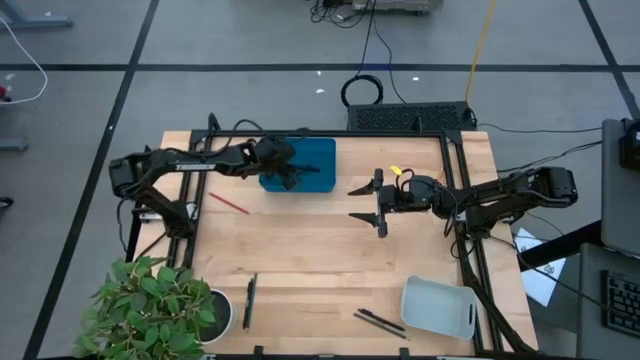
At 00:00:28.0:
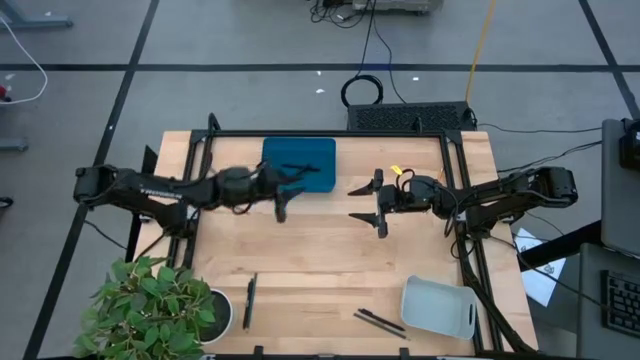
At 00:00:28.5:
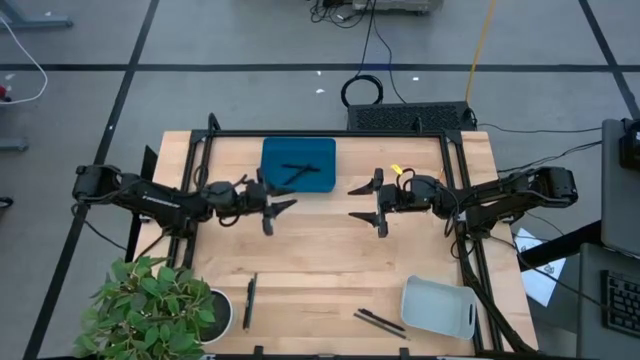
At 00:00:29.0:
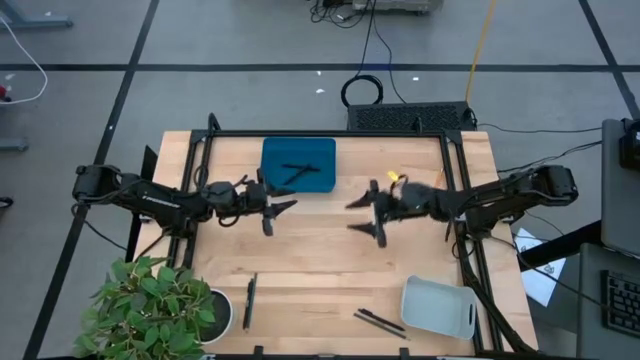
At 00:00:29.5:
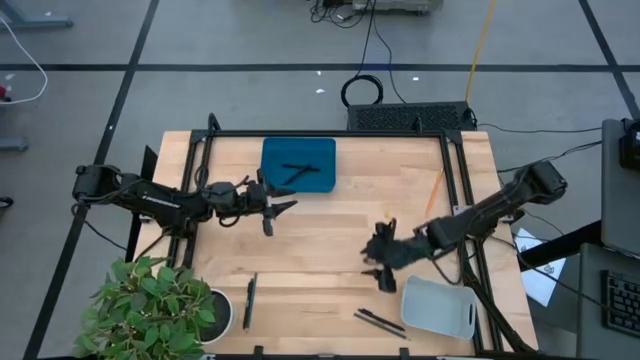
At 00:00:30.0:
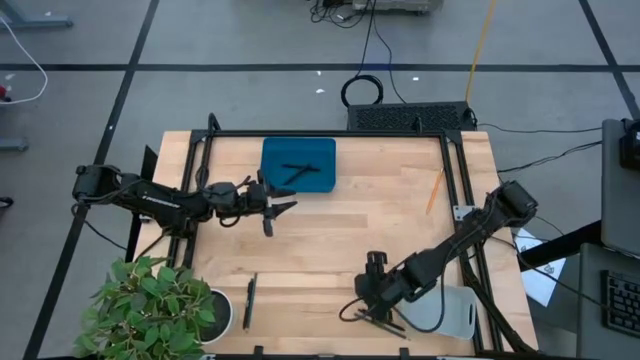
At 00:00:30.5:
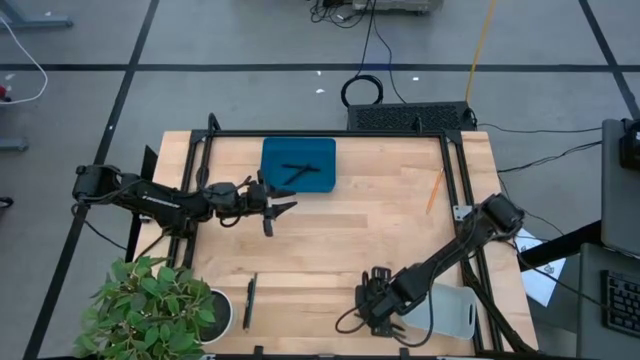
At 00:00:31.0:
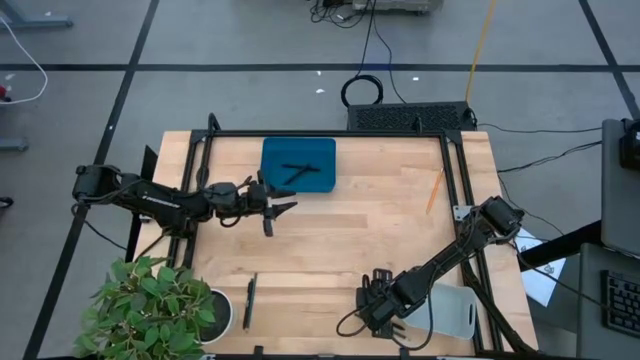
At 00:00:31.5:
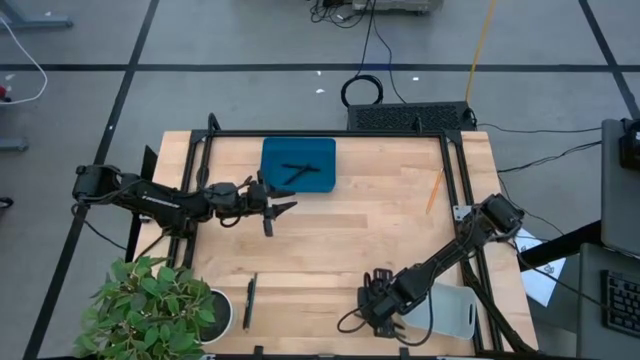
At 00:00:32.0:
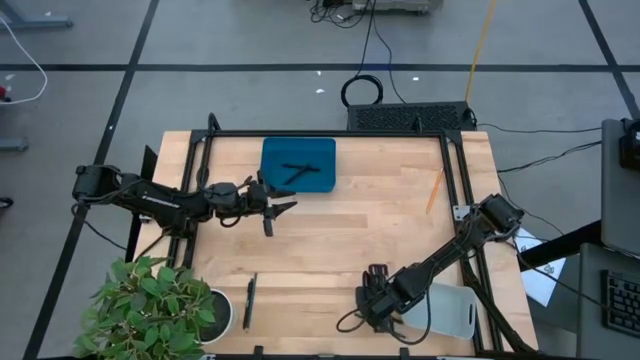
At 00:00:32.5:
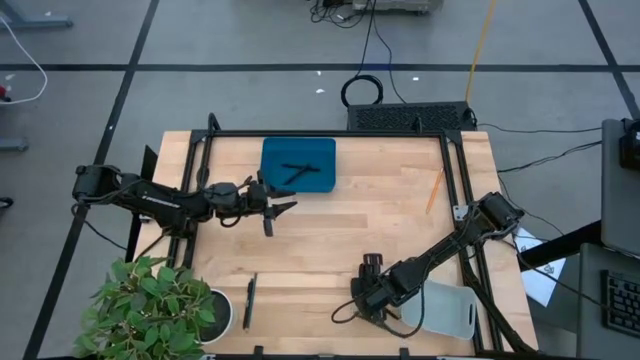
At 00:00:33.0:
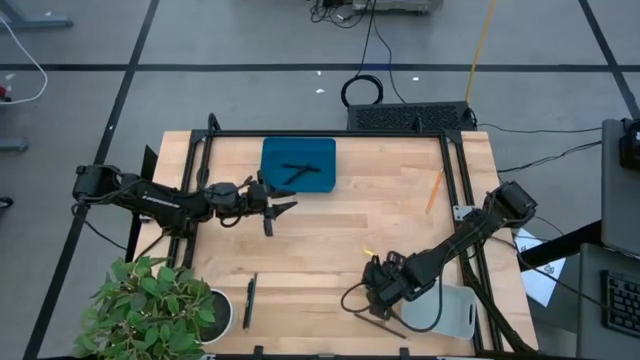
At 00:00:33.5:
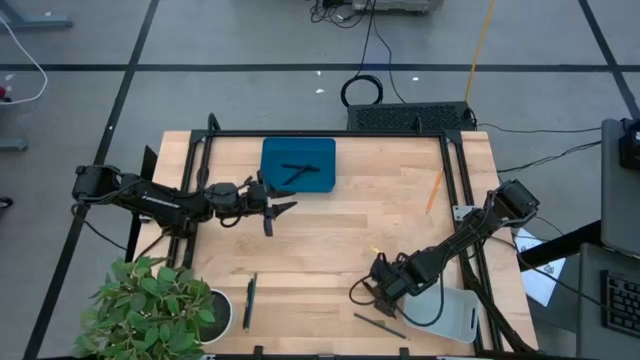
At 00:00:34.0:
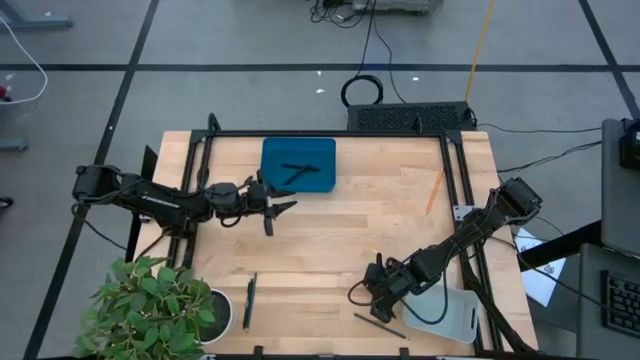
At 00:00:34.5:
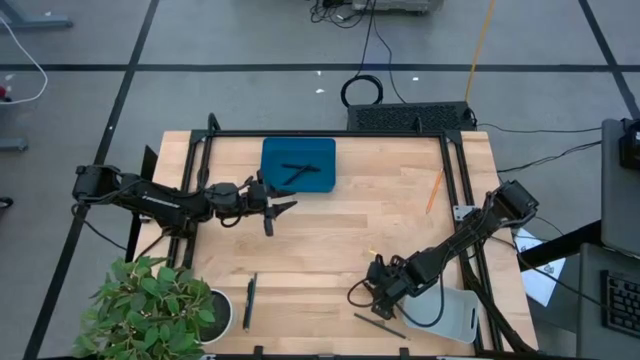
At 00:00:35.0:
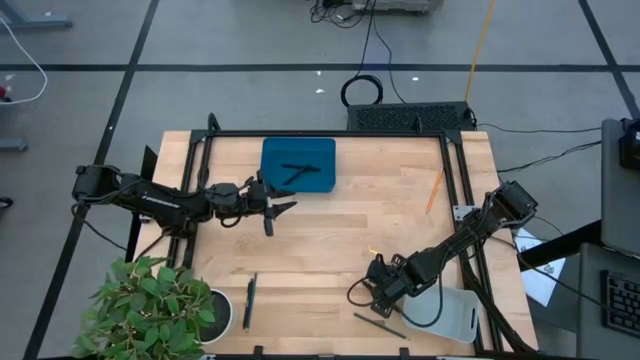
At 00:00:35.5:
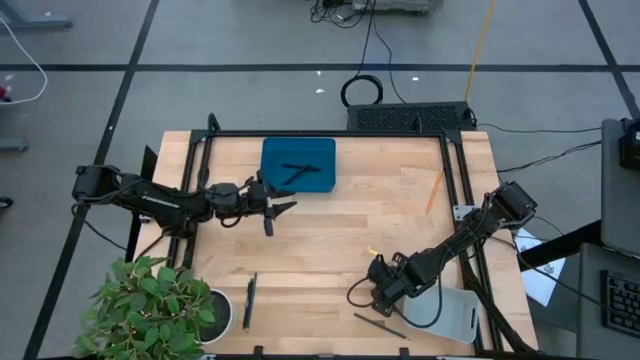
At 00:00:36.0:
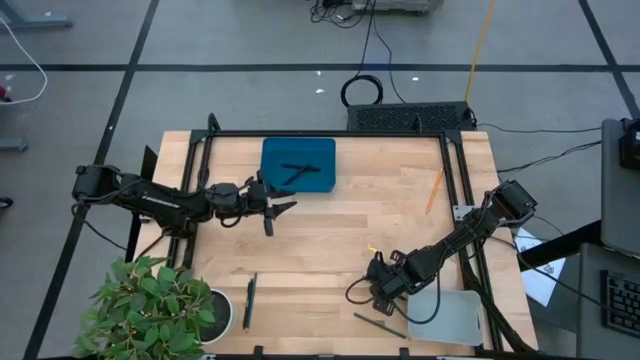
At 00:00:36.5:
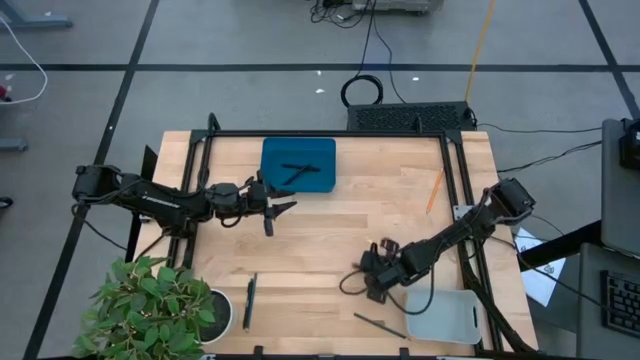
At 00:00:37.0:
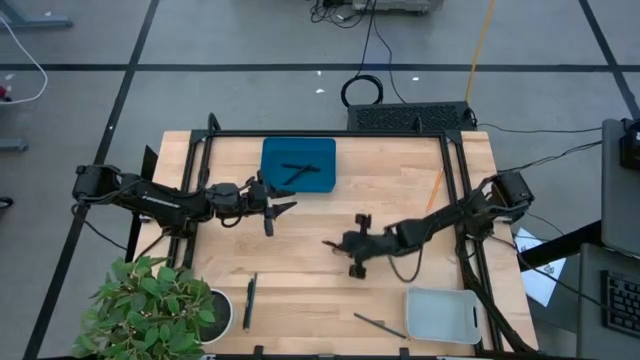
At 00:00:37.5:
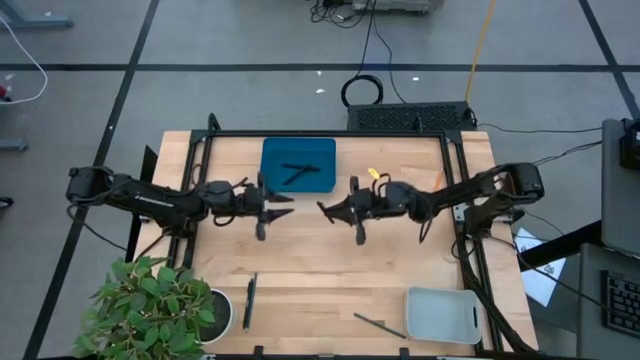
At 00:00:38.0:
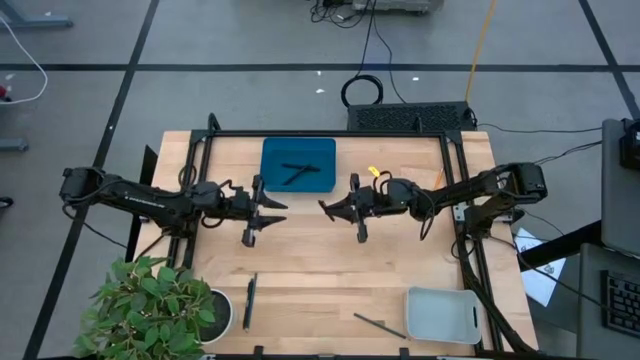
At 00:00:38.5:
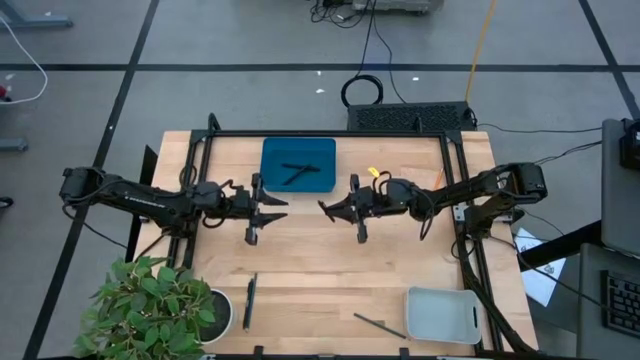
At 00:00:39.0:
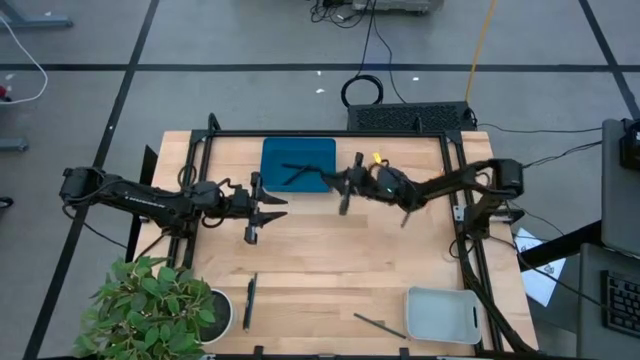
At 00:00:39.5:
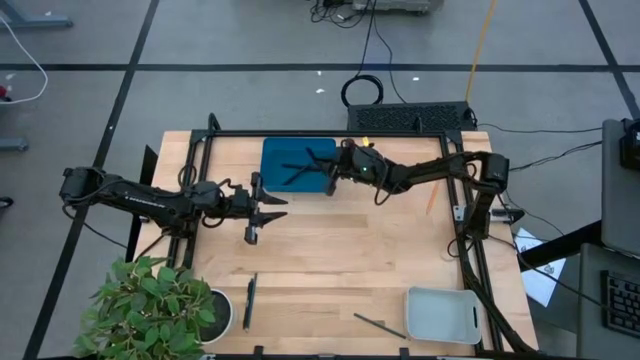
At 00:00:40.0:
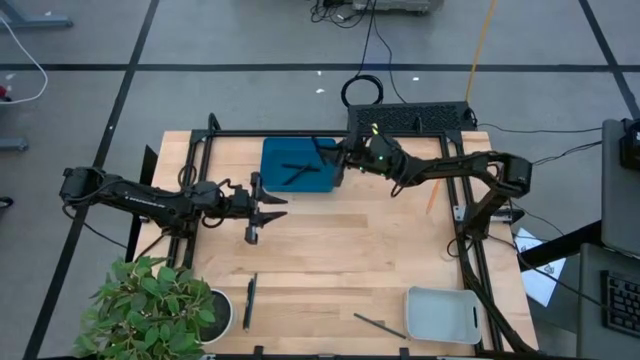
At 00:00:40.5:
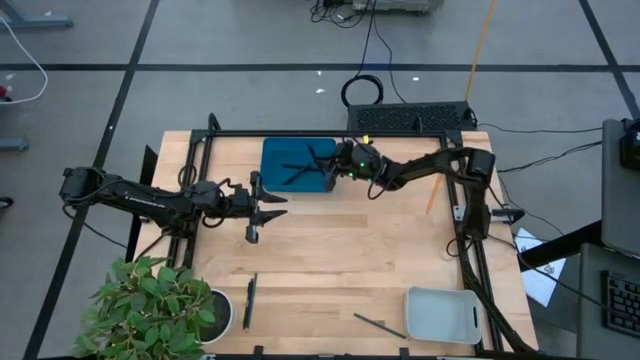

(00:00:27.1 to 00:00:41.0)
Task: Sort pens & pencils
Put the right black pen into the blue bin

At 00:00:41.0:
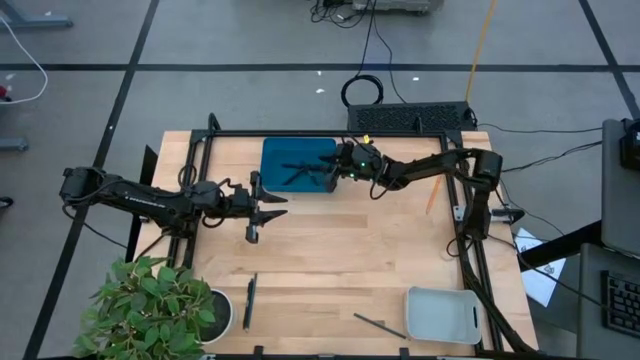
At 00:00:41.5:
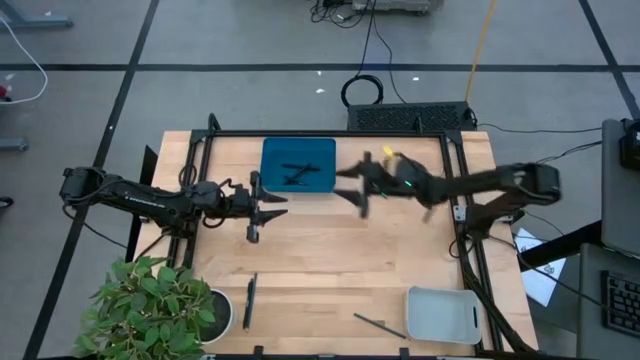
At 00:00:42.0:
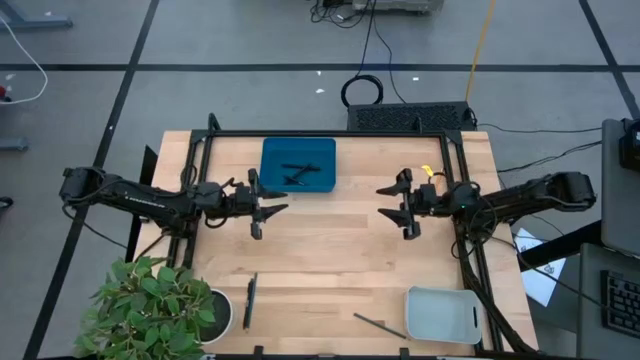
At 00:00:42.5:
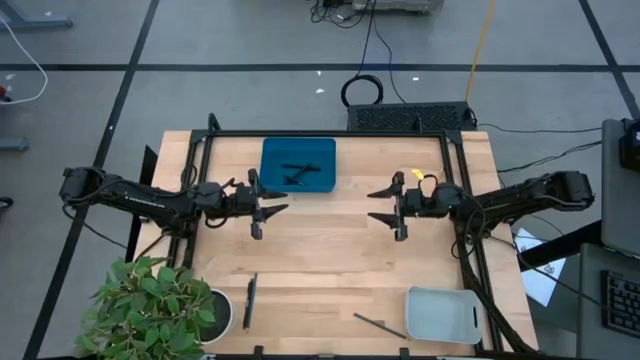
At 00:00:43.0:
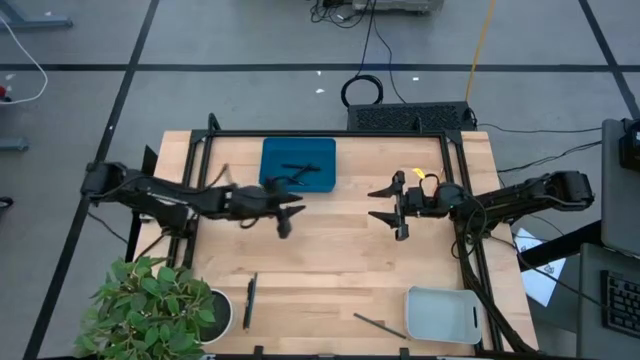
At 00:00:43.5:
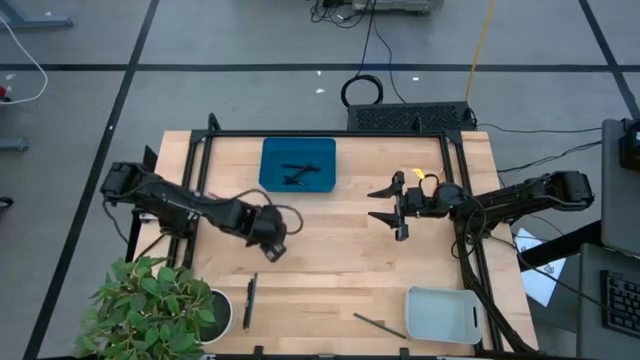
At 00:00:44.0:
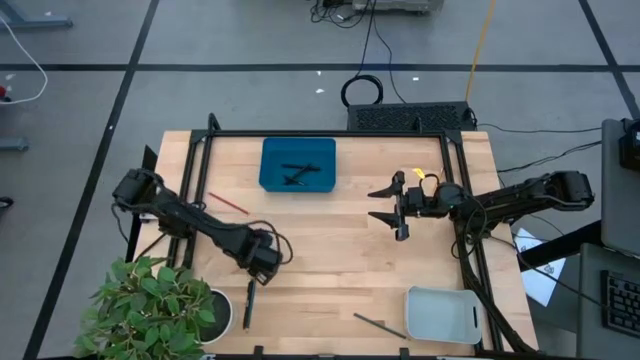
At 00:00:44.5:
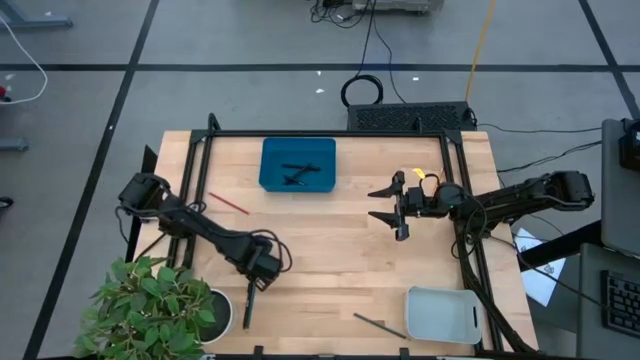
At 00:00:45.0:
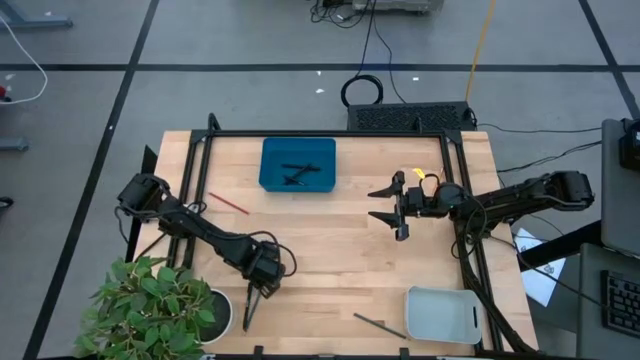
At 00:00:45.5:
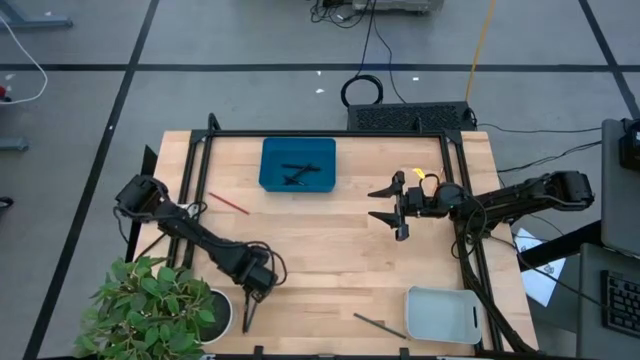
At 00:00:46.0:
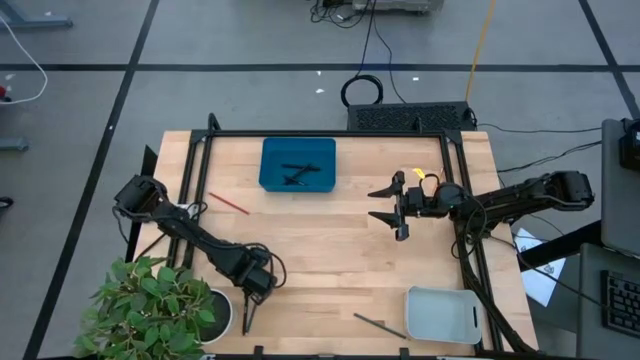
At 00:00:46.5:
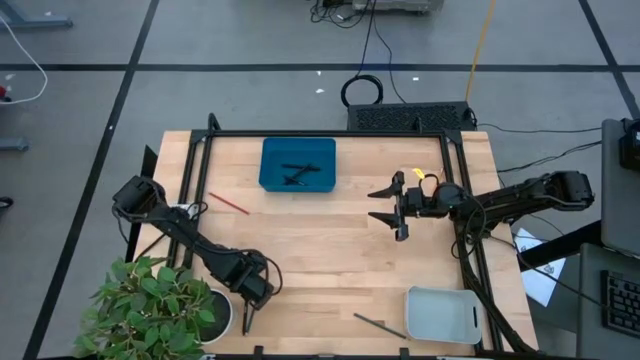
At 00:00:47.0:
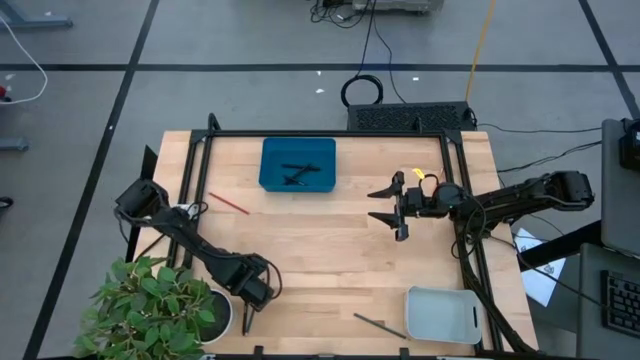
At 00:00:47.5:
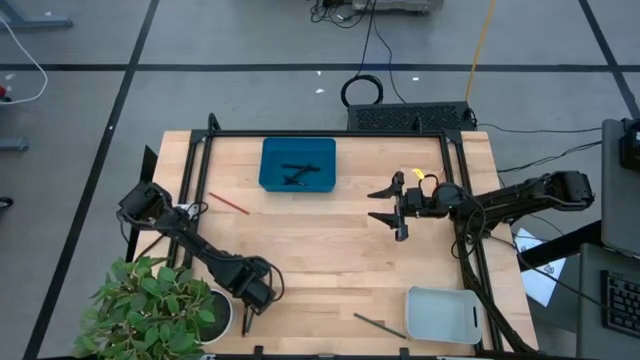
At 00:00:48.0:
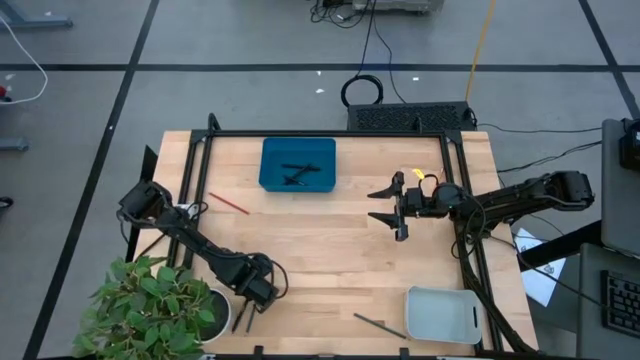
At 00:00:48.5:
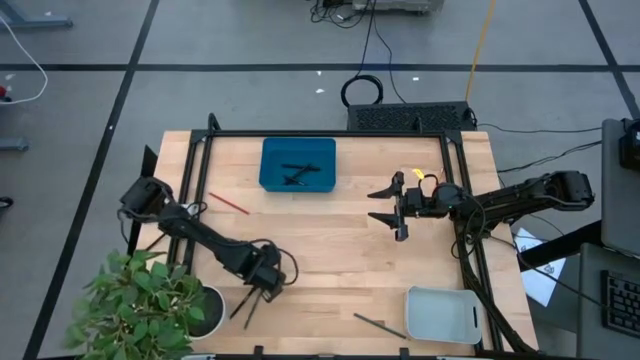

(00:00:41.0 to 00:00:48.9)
Put the black pen into the blue bin
